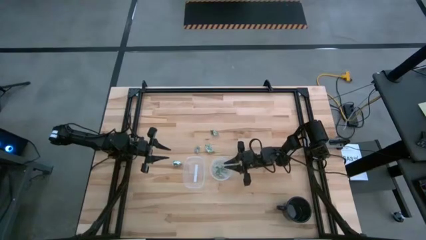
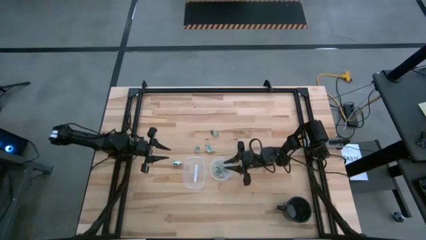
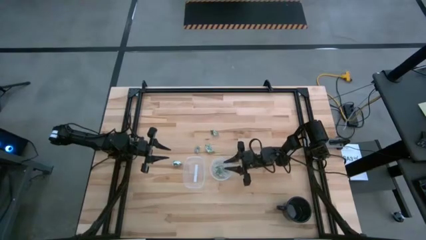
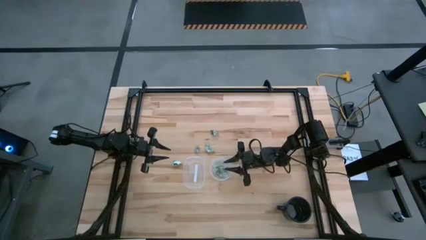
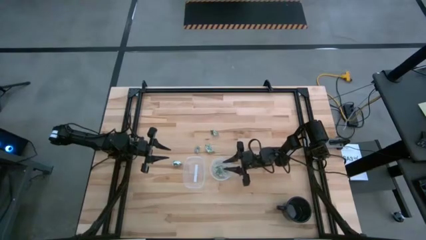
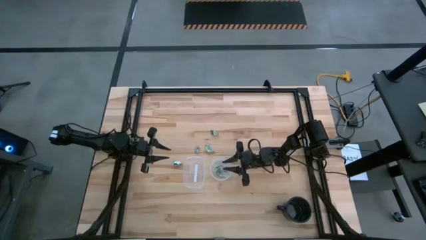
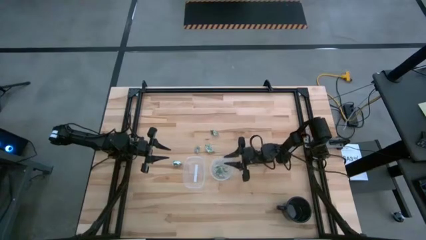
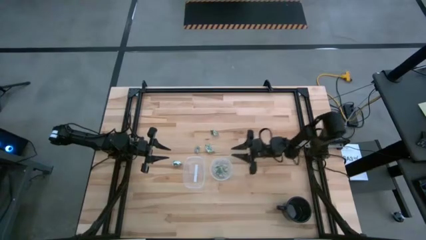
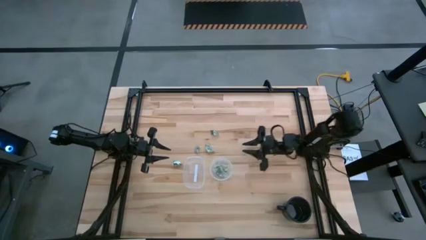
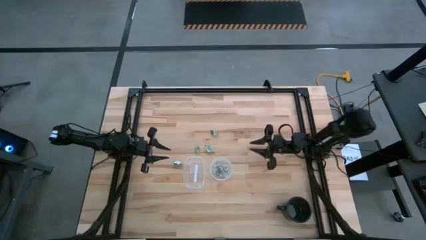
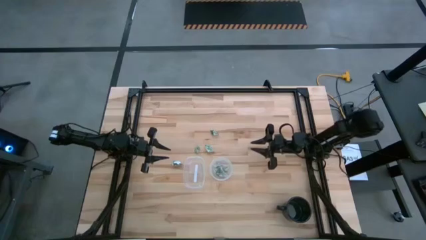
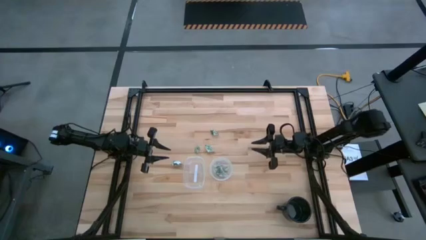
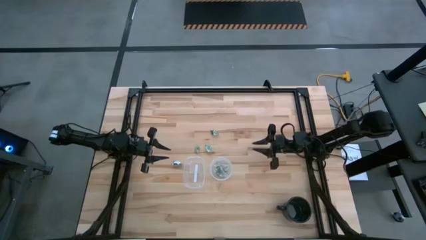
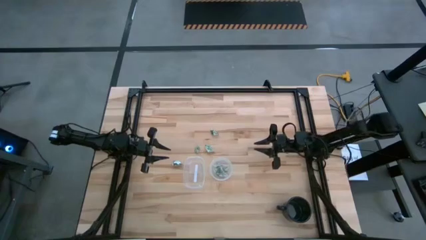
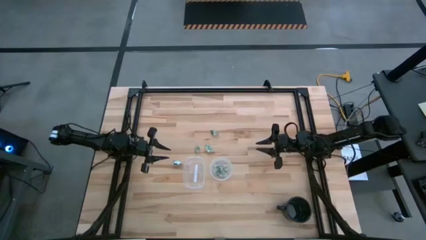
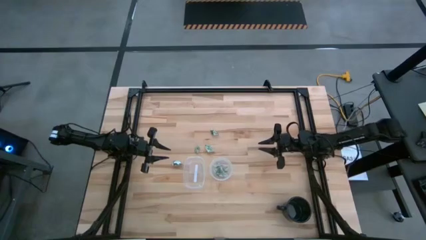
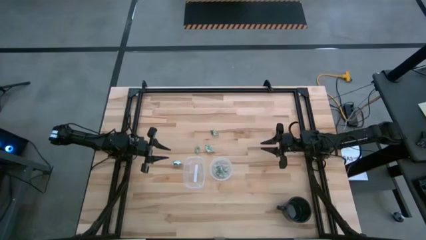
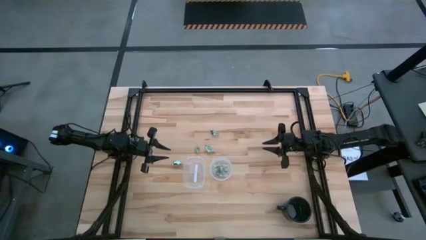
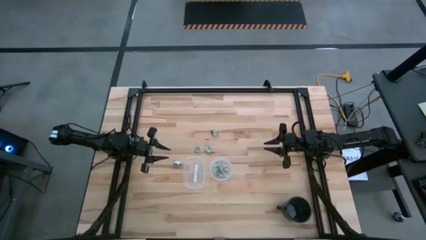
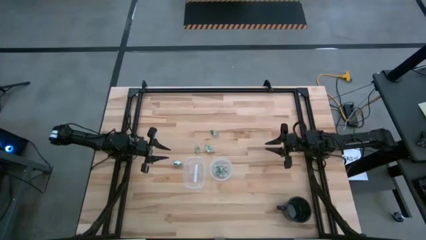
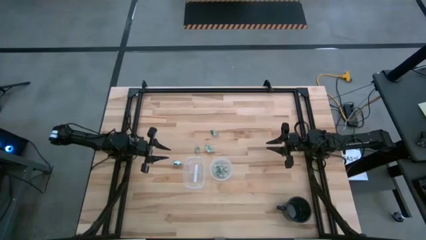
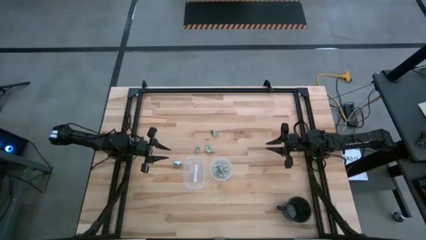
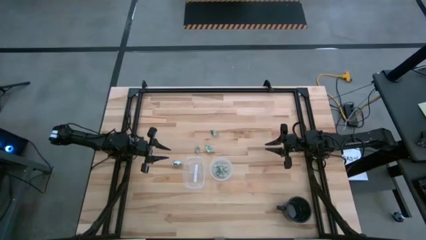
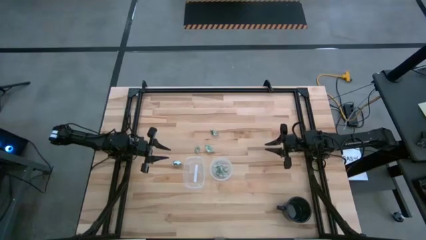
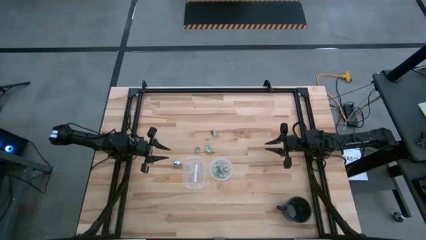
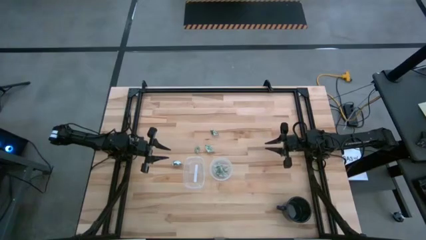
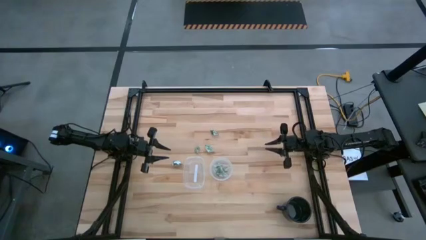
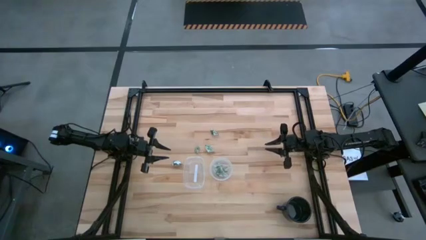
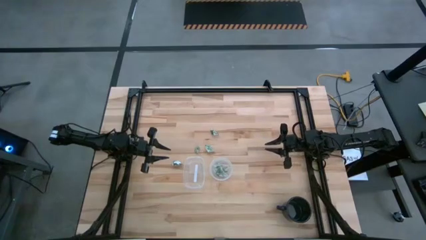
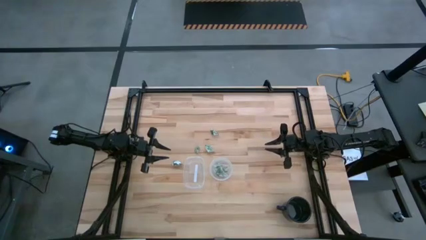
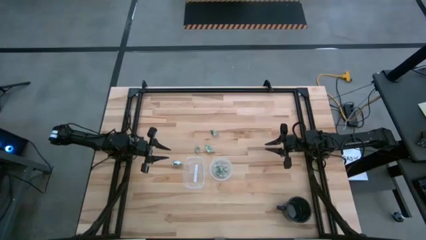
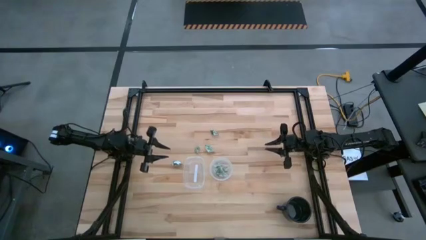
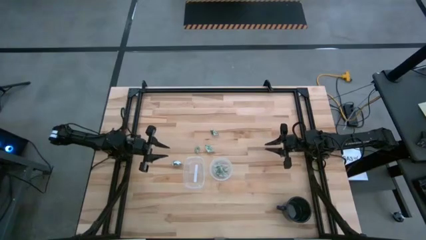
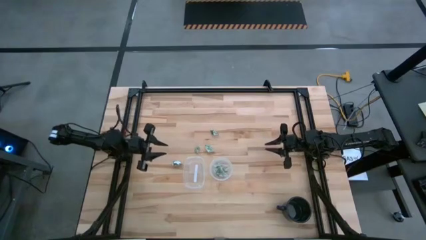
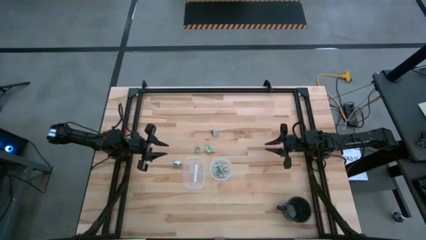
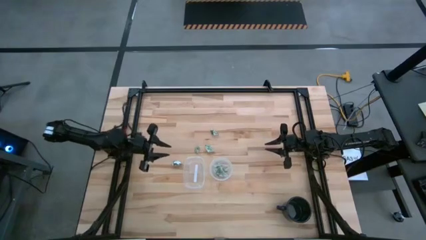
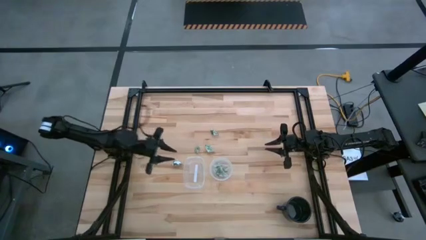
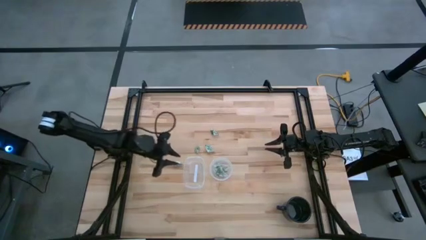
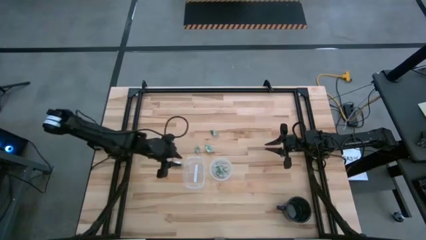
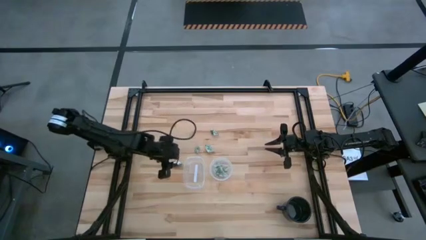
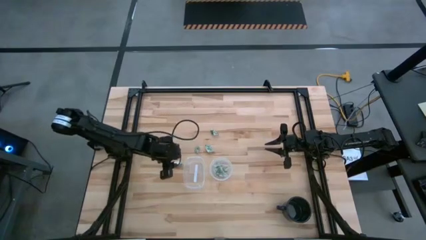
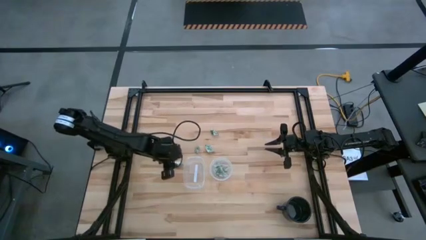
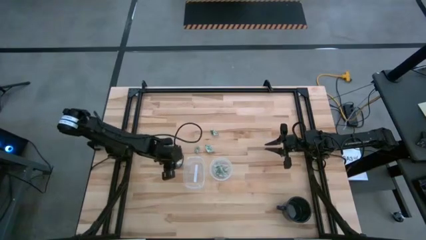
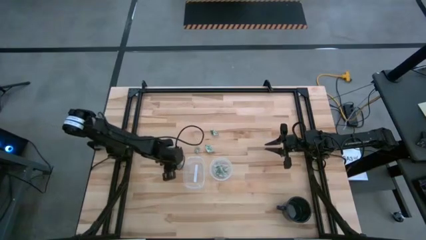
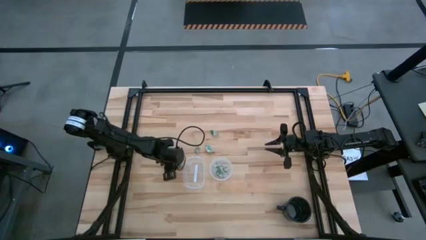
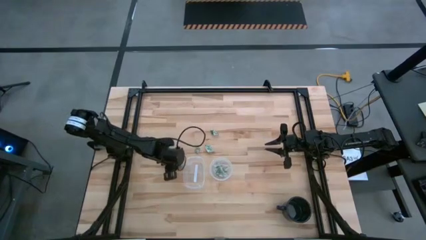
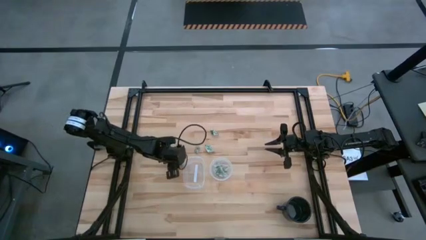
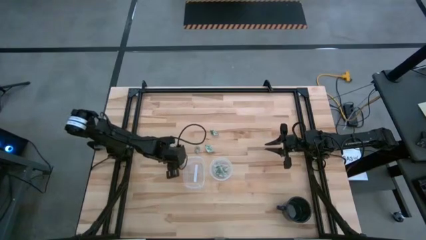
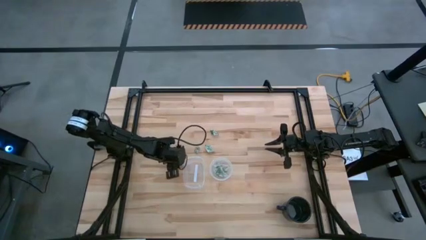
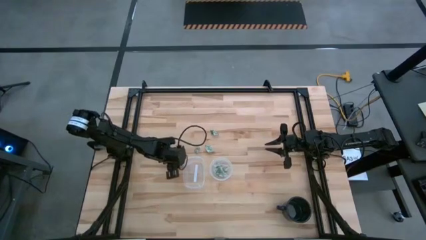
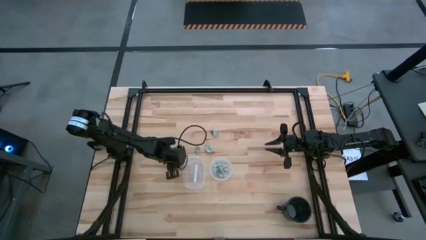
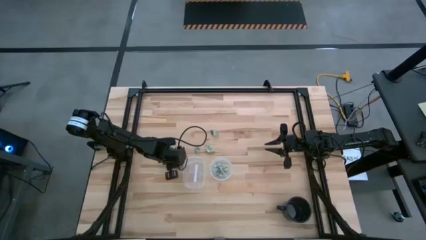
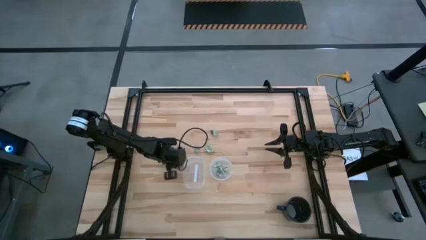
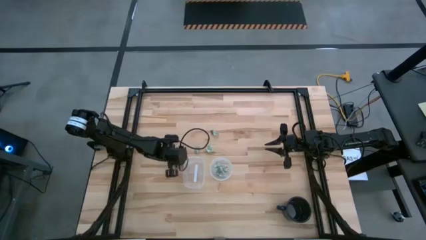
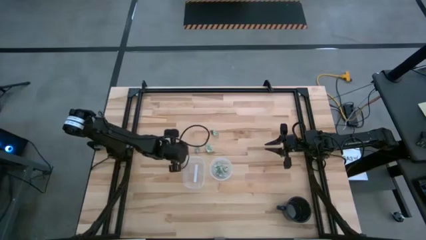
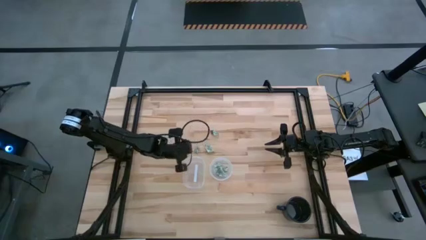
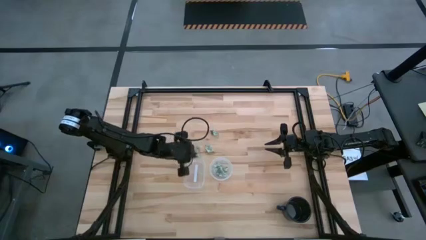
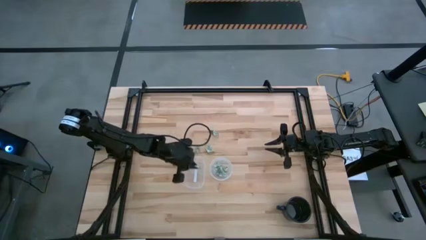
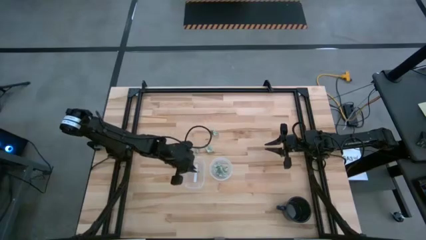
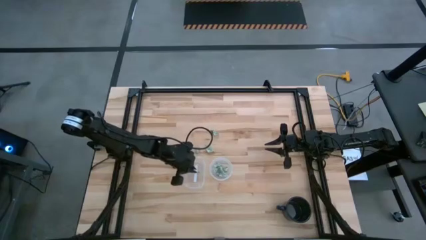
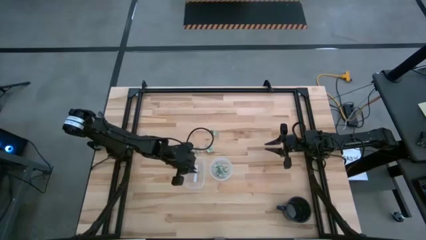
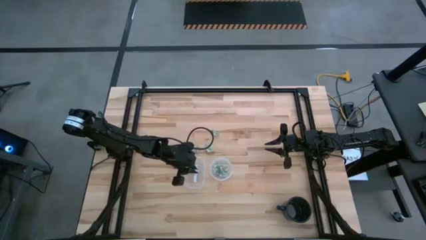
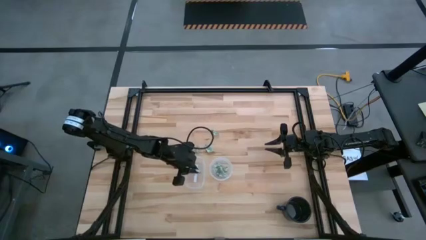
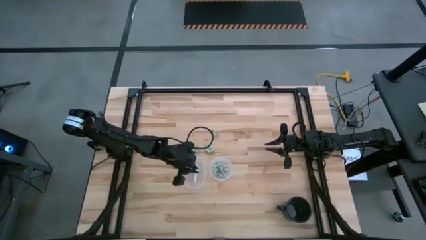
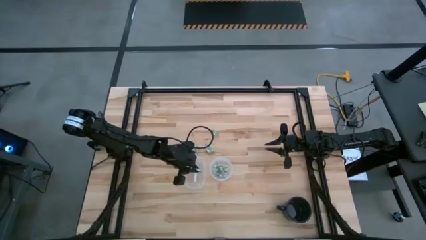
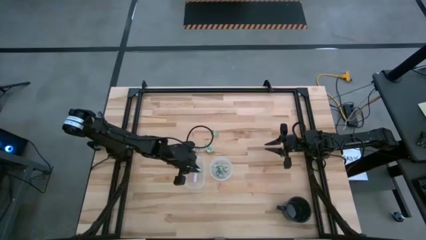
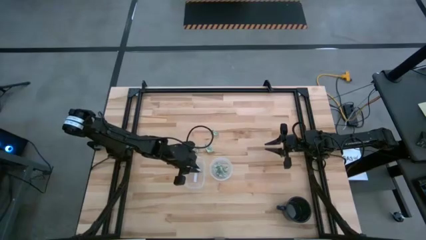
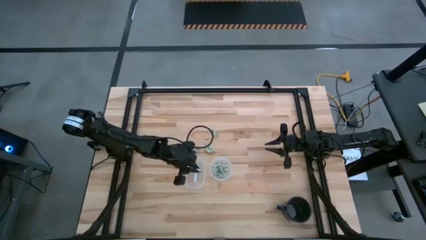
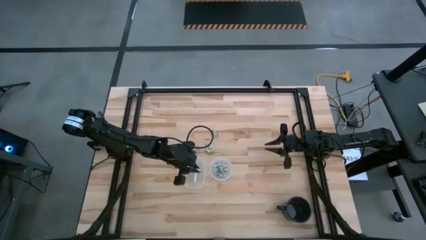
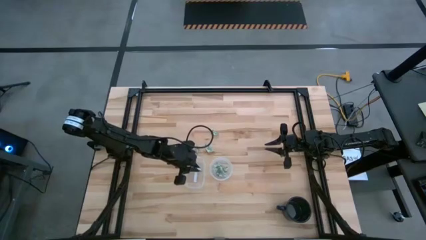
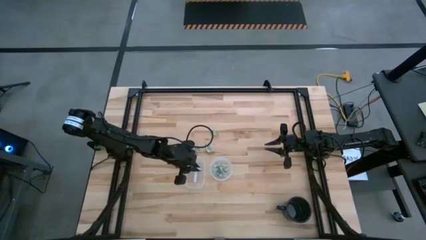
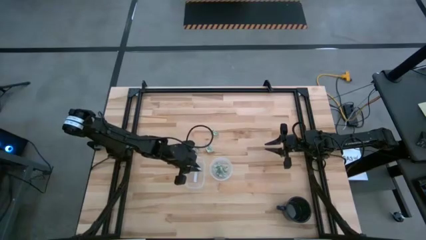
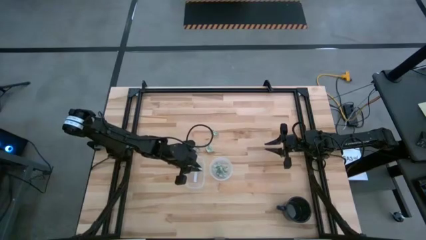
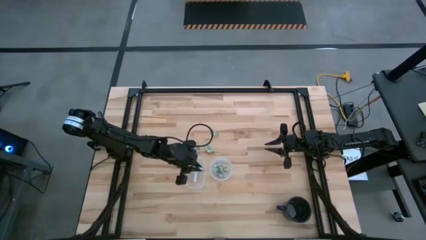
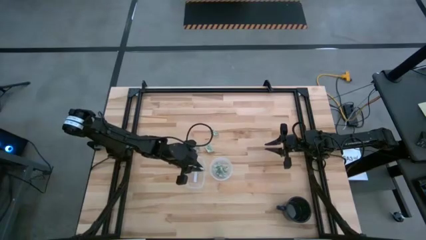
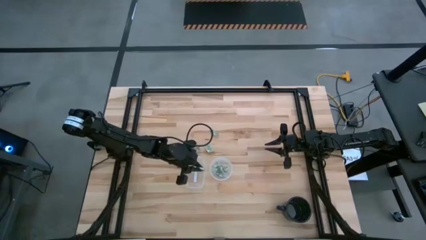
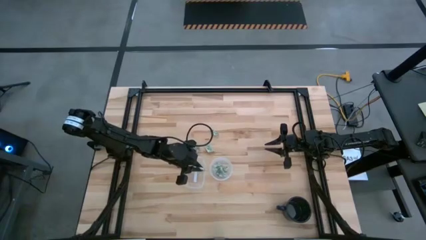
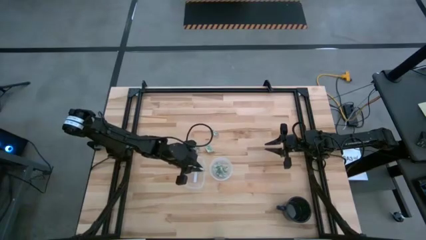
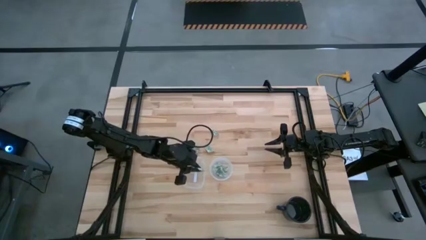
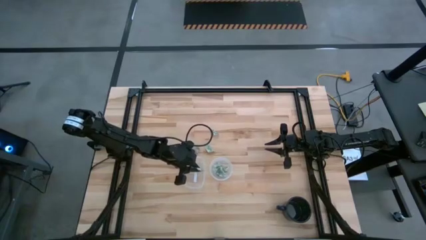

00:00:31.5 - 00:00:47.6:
Task: Pick and place items into bin
Put the stevia packet into the left transparent bin
